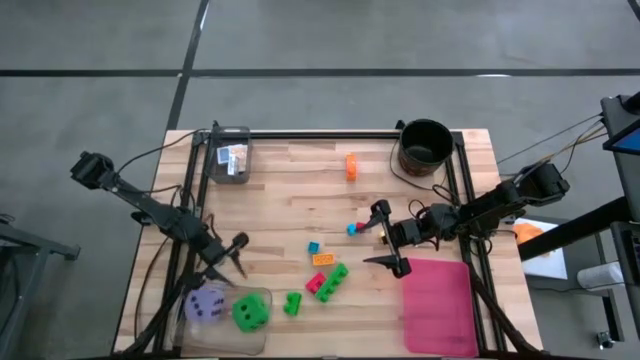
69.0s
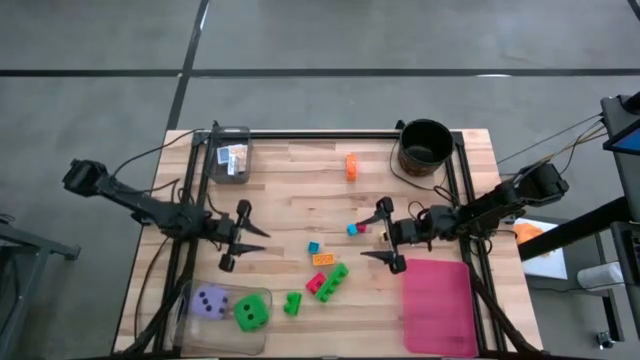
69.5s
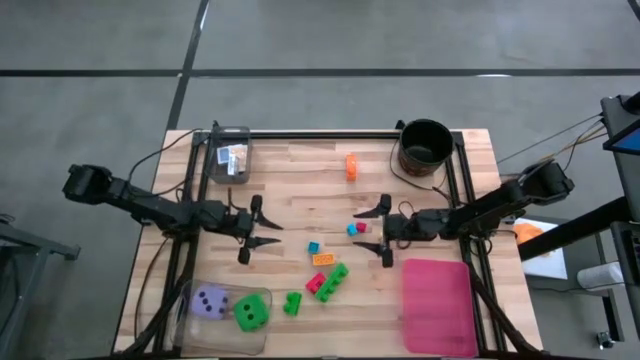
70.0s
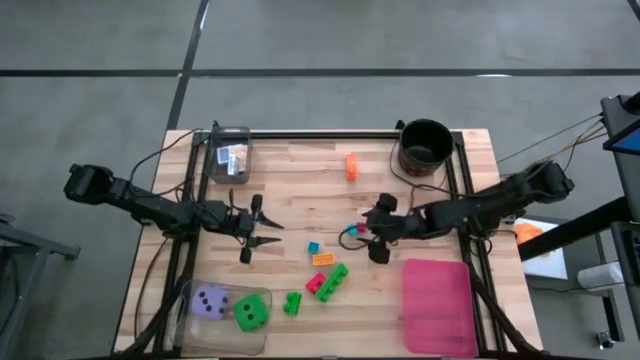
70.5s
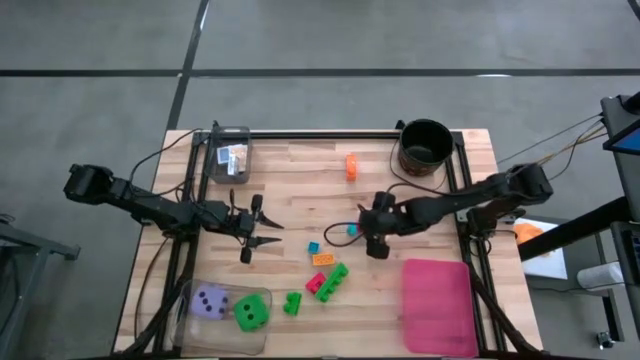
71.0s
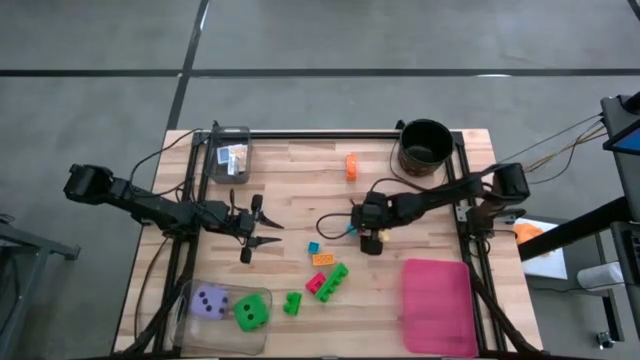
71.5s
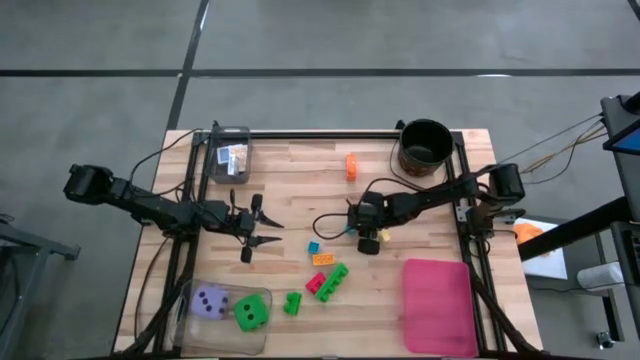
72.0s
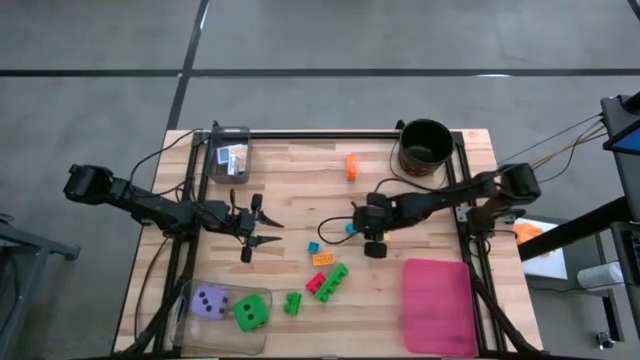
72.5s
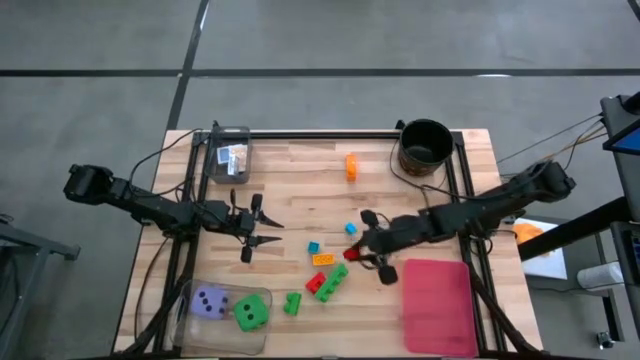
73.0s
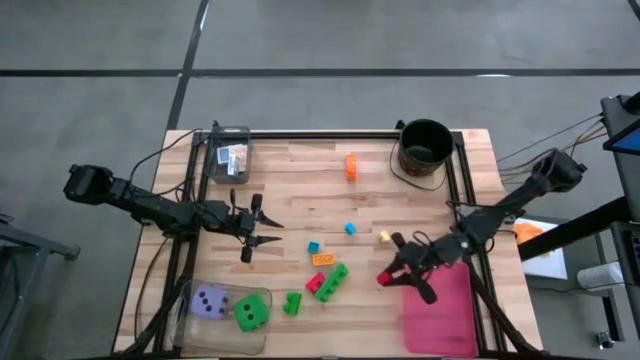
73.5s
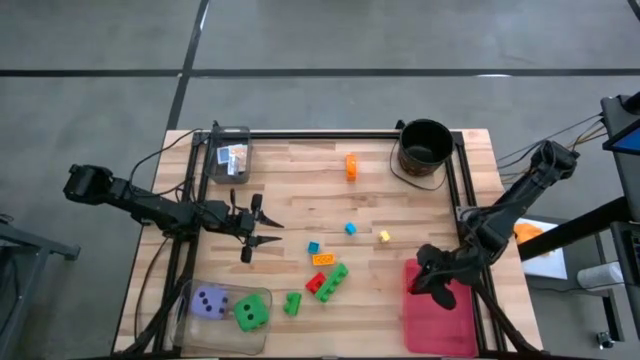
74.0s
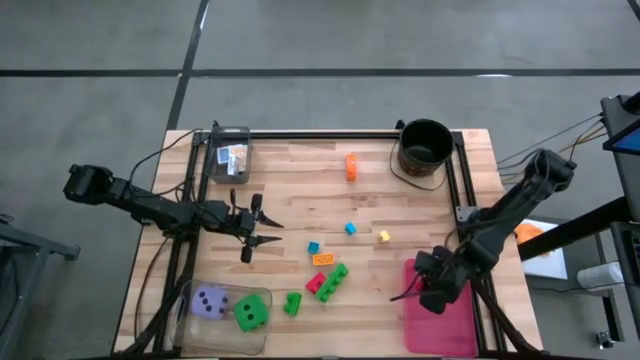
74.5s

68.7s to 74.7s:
Task: Pick & Place Toys
Put the right red game piece into the pink bin

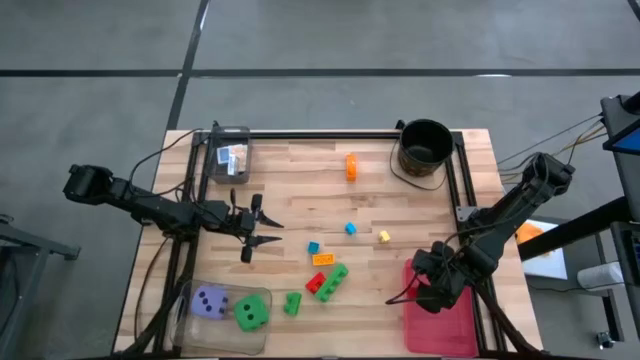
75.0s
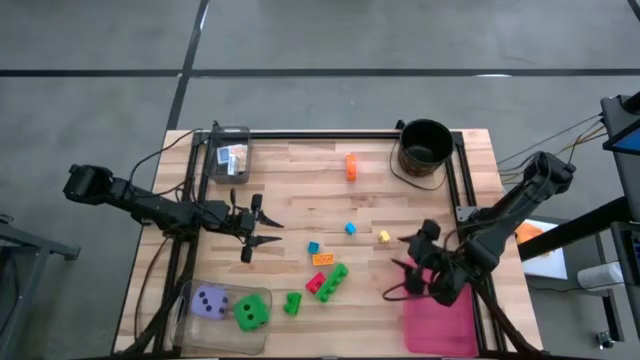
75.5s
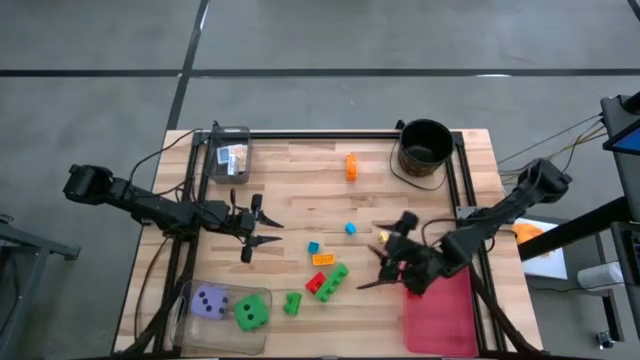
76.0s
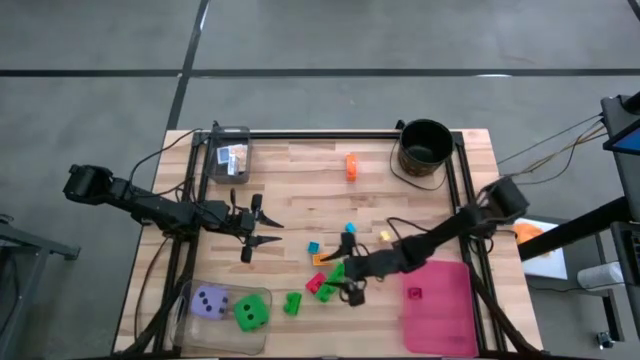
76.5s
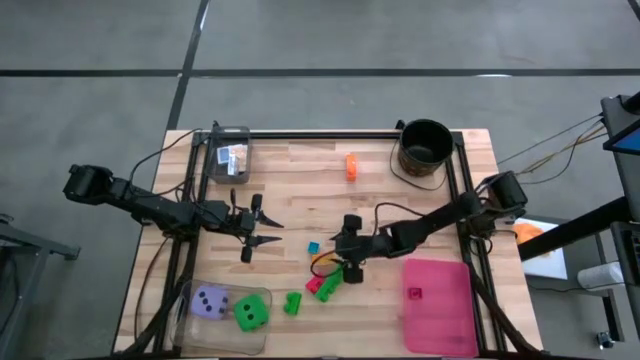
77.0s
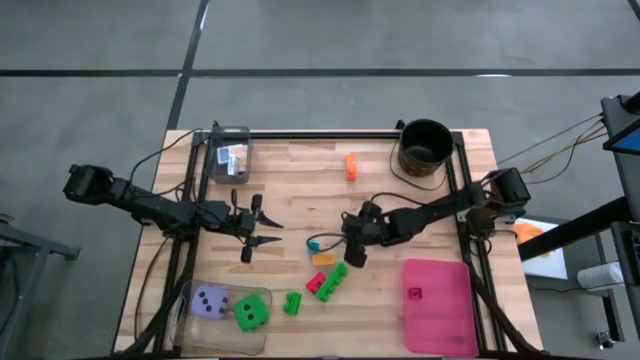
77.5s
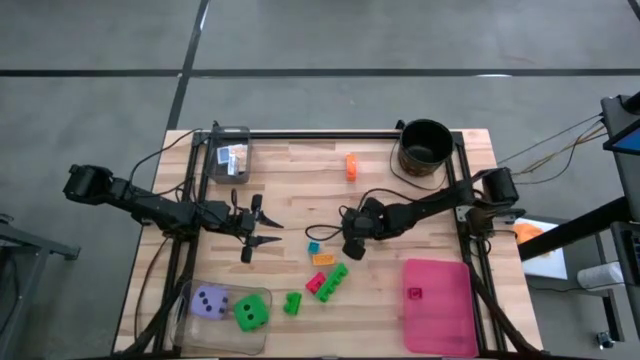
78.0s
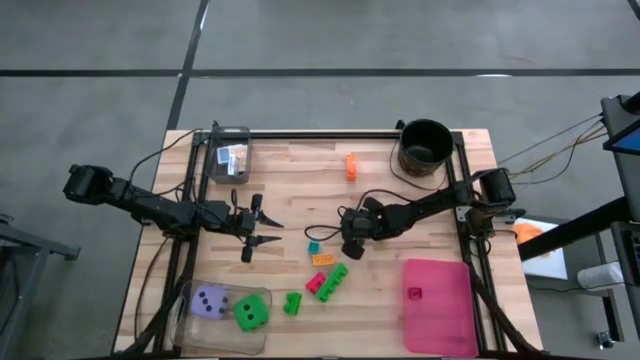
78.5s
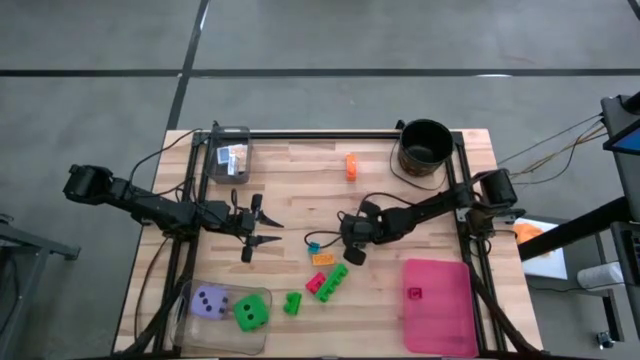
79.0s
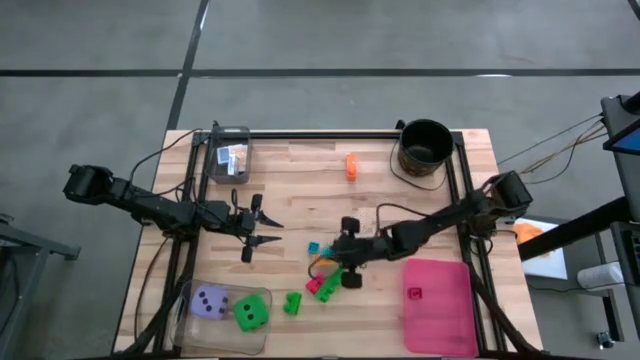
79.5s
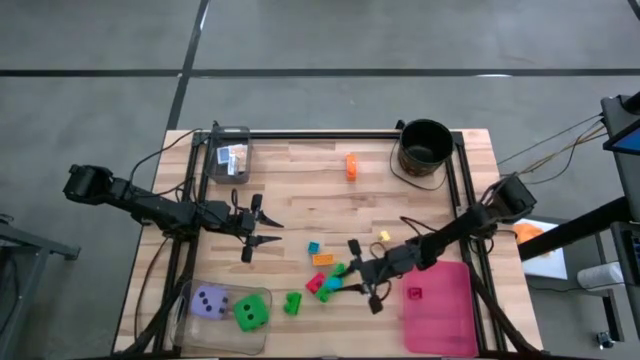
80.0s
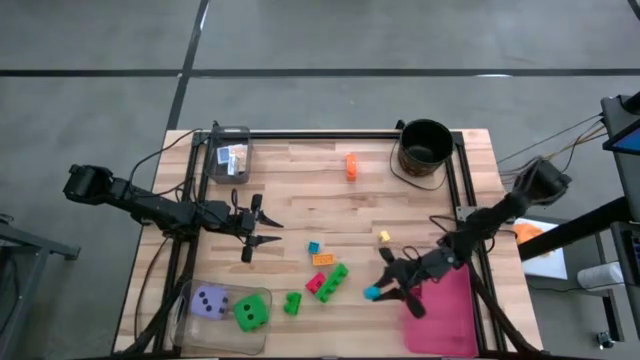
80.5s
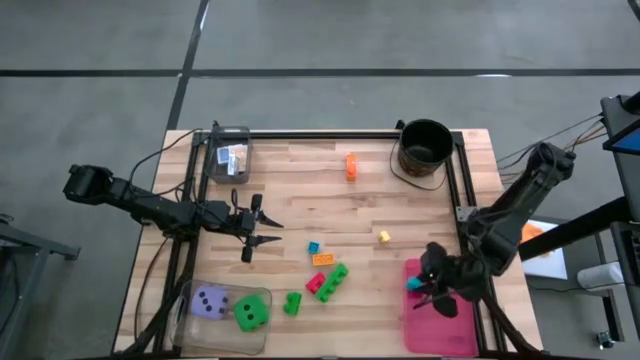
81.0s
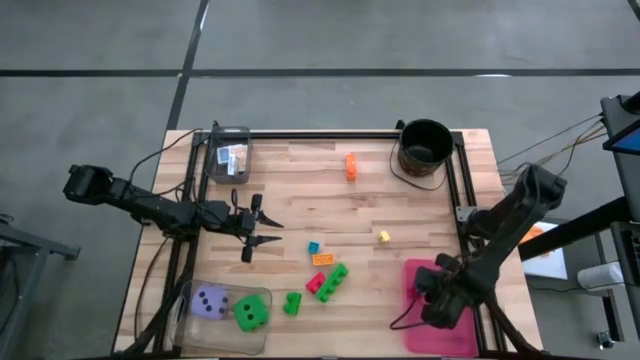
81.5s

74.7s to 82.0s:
Put the right light blue game piece into the pink bin

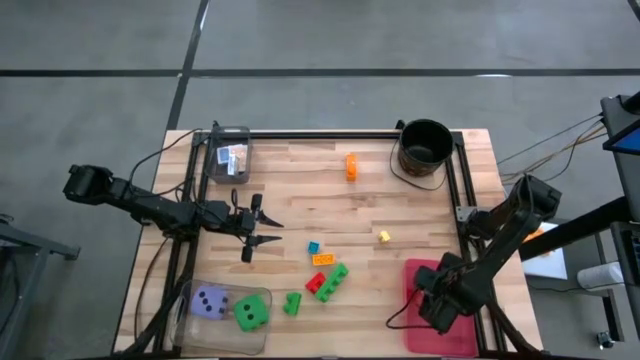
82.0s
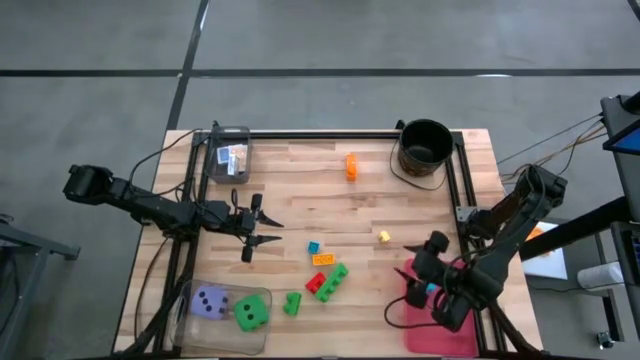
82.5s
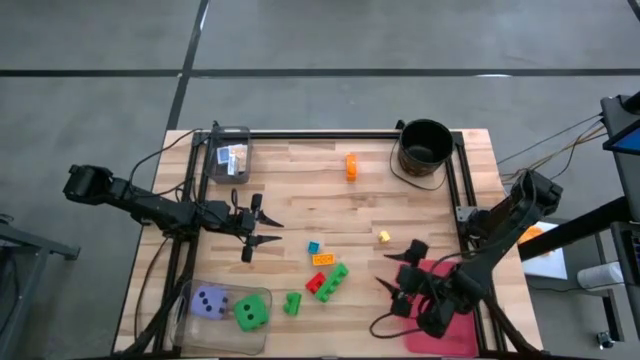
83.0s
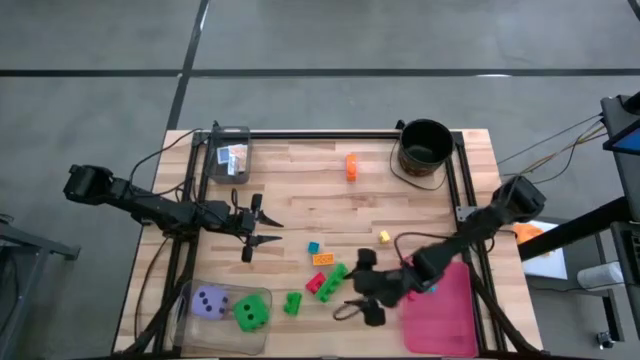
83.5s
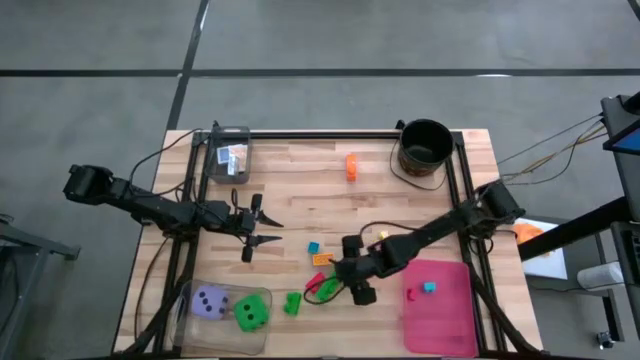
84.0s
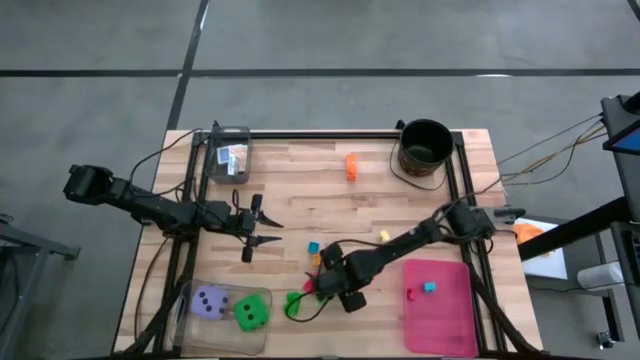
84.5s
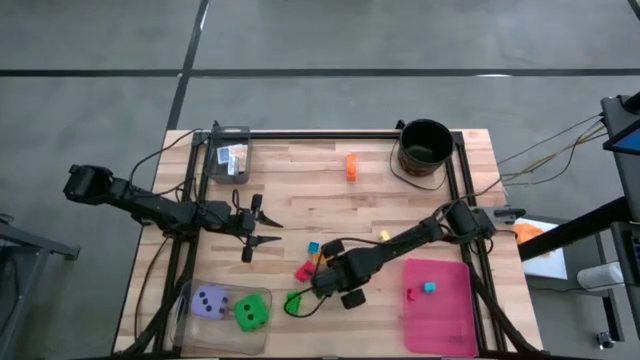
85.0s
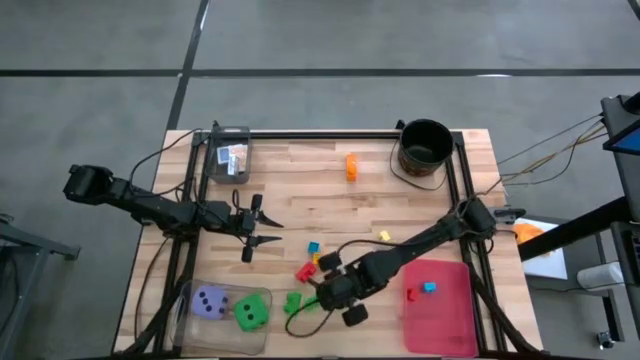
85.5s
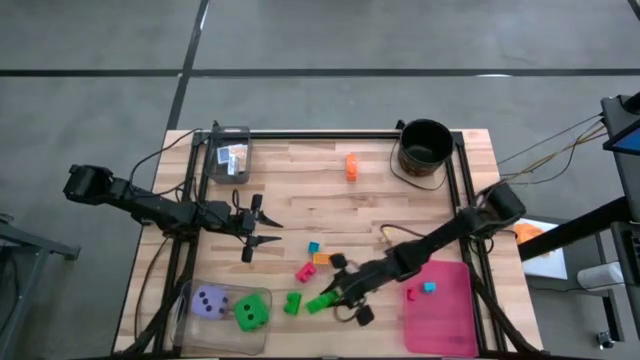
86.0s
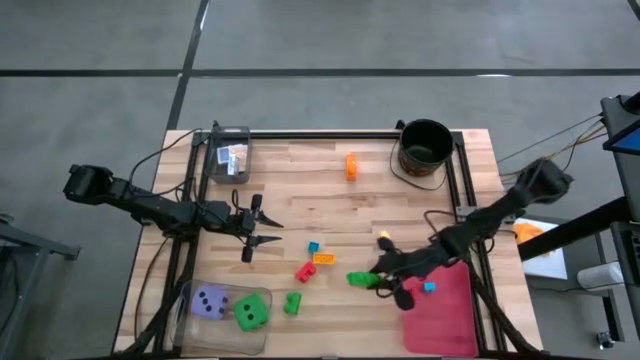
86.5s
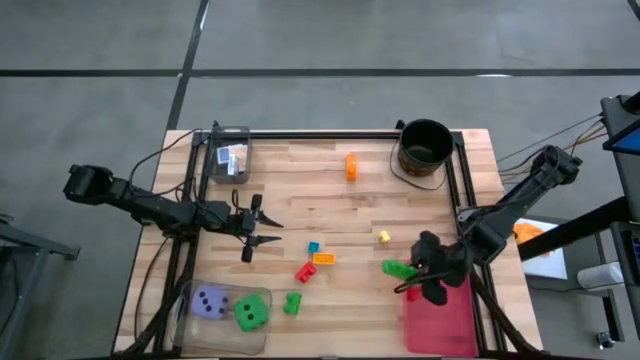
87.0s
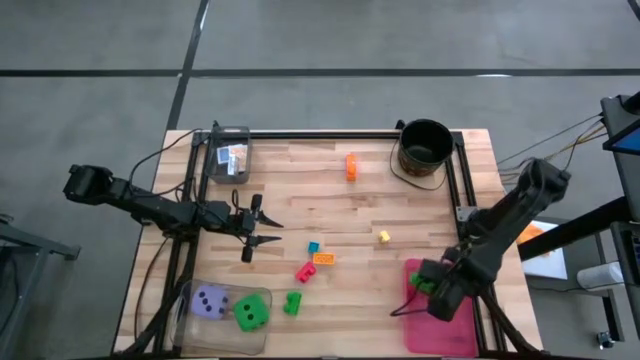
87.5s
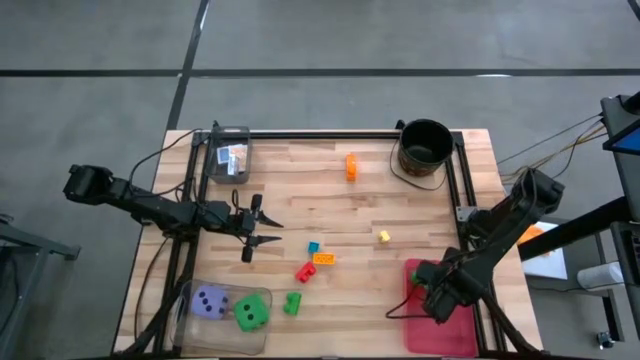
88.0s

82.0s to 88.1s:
Put the right green game piece into the pink bin

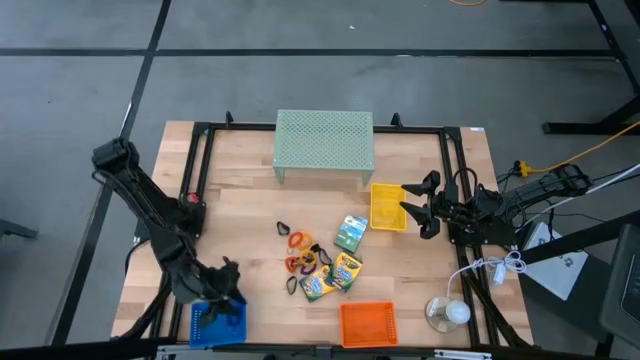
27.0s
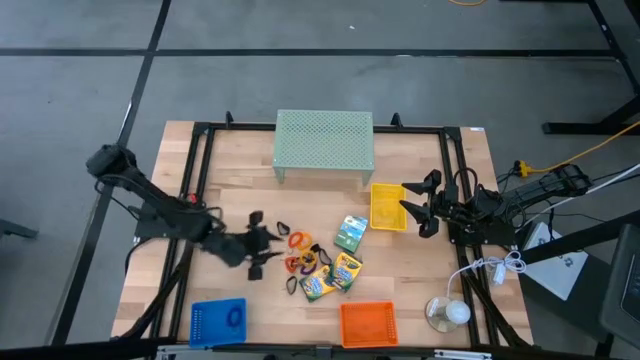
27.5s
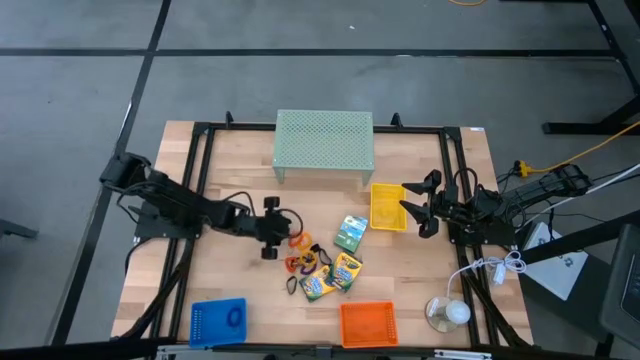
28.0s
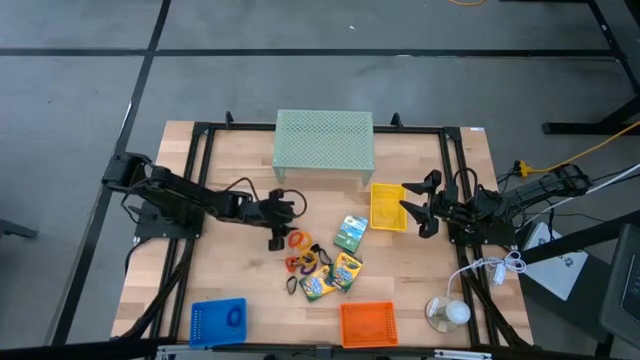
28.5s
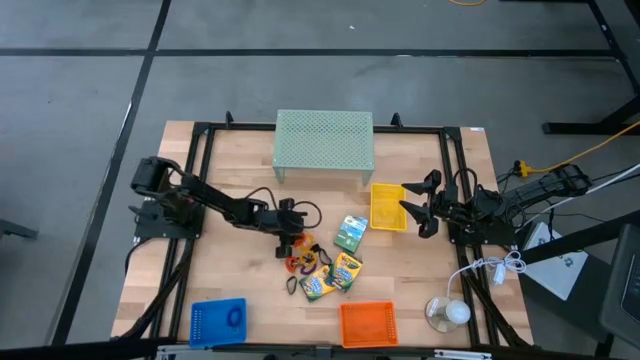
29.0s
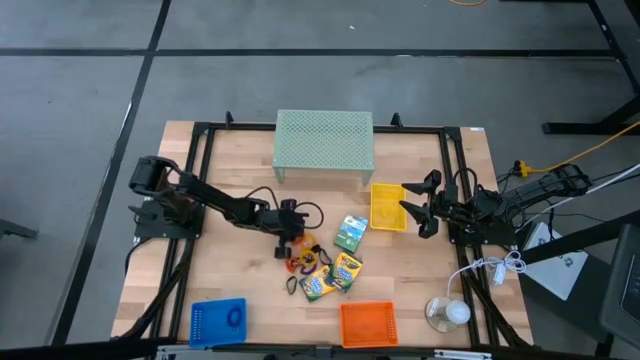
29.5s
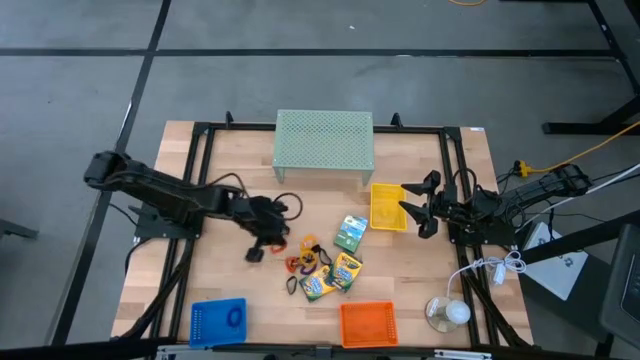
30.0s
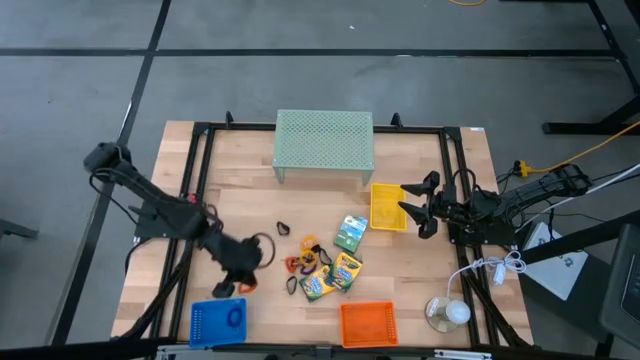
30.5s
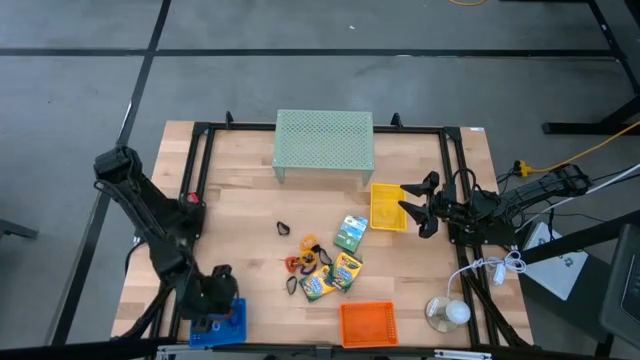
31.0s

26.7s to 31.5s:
Task: Pick & Place Office Desk Supplies
Put the orange spring keychain into the blue bin
